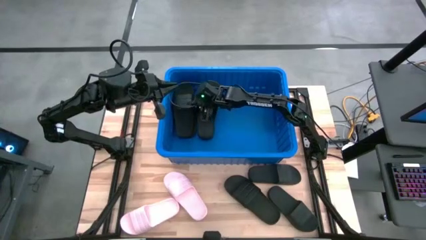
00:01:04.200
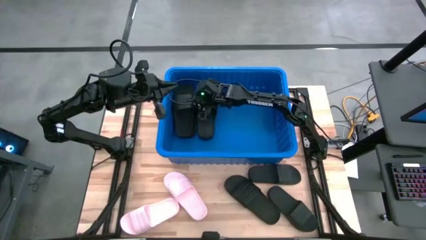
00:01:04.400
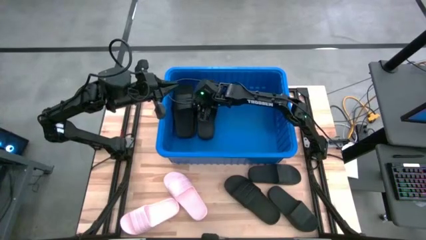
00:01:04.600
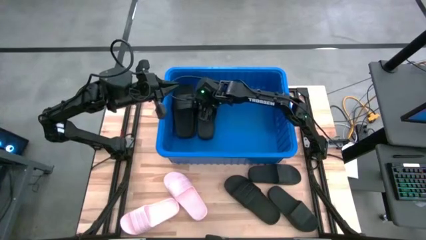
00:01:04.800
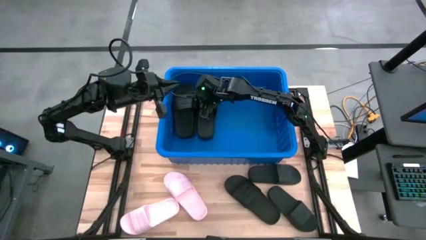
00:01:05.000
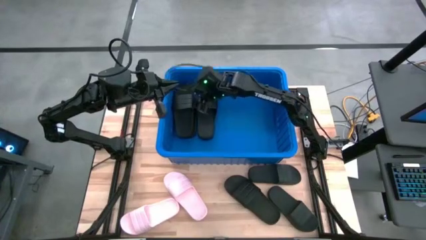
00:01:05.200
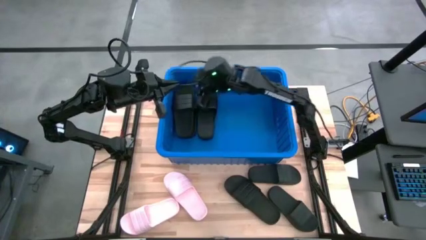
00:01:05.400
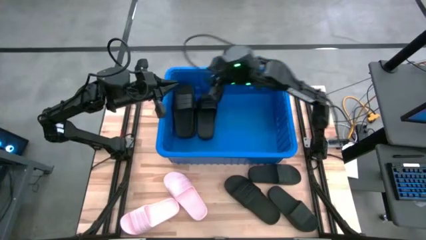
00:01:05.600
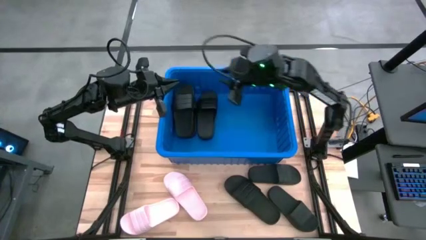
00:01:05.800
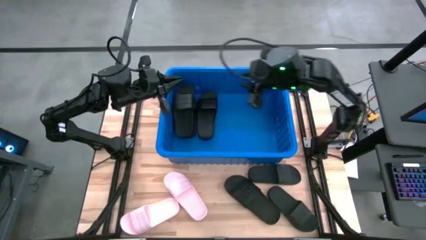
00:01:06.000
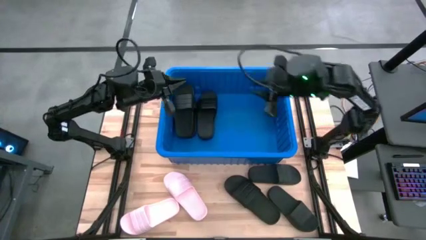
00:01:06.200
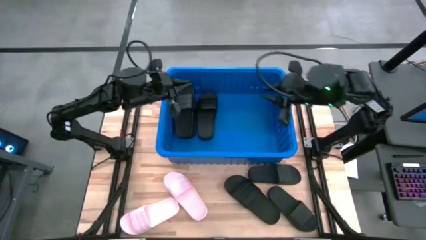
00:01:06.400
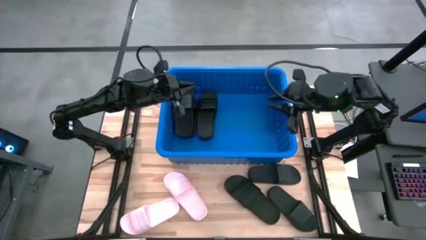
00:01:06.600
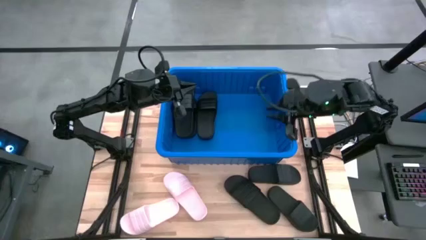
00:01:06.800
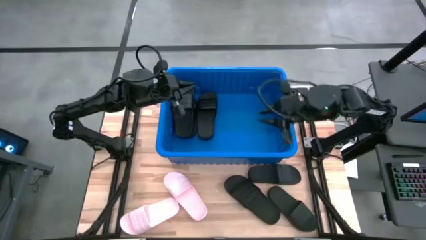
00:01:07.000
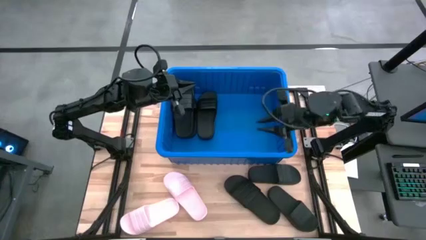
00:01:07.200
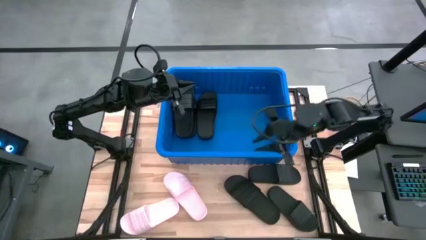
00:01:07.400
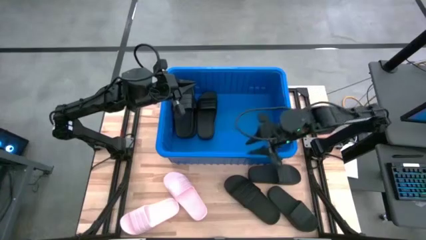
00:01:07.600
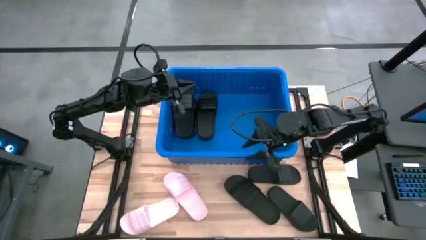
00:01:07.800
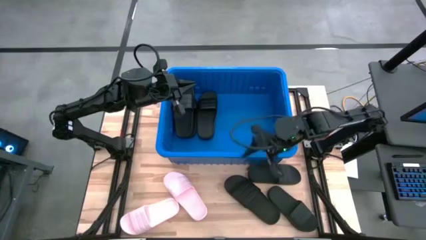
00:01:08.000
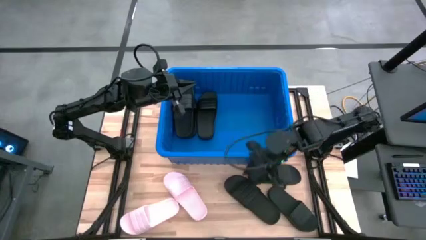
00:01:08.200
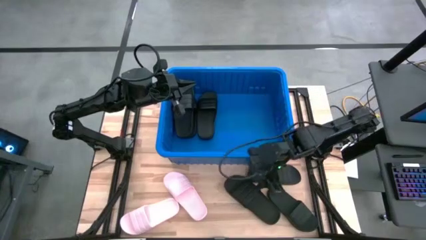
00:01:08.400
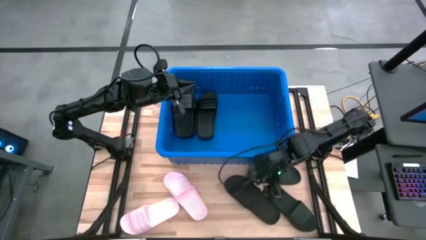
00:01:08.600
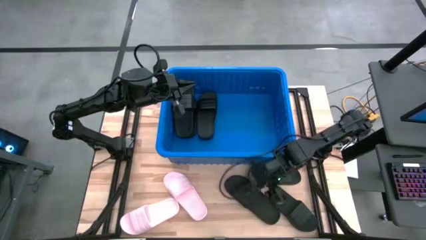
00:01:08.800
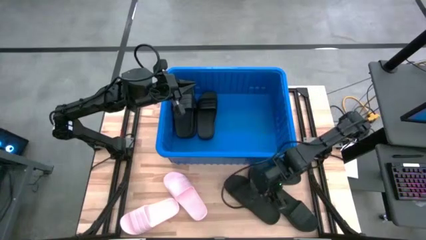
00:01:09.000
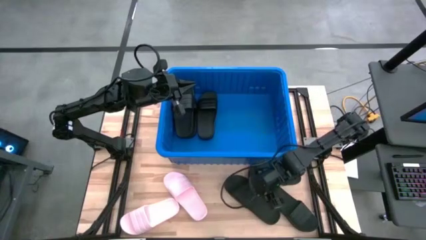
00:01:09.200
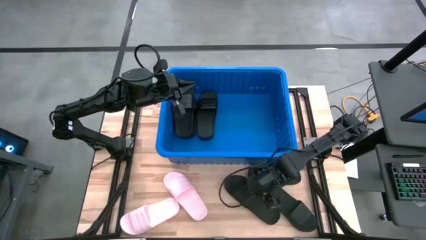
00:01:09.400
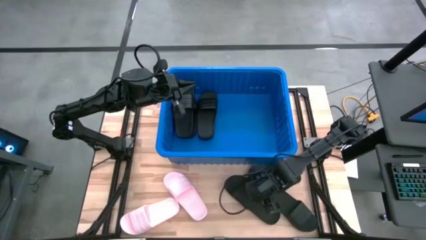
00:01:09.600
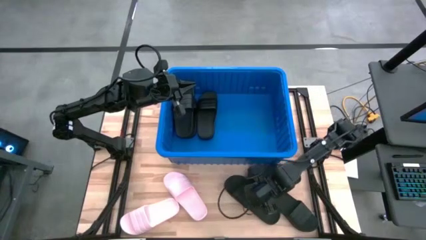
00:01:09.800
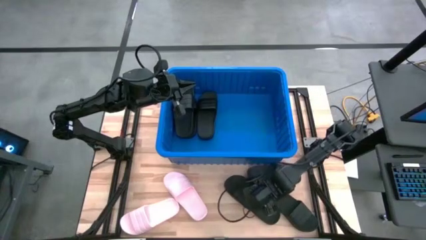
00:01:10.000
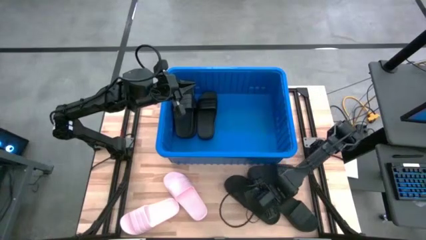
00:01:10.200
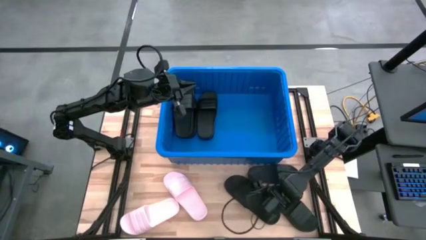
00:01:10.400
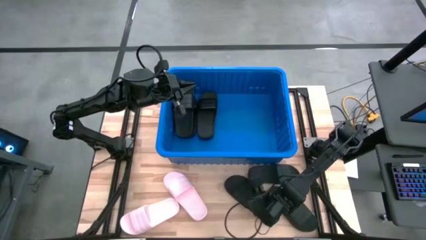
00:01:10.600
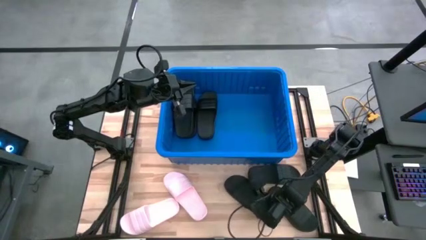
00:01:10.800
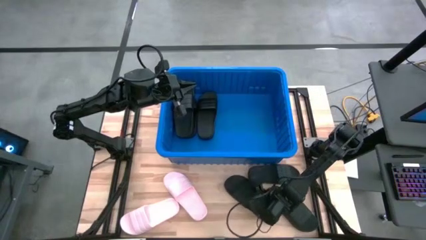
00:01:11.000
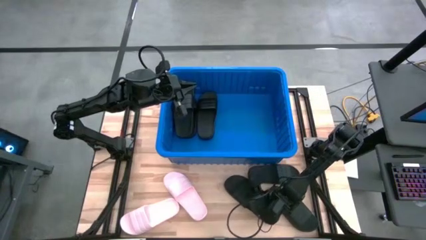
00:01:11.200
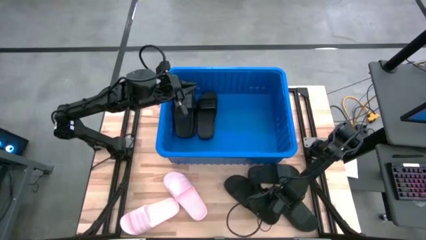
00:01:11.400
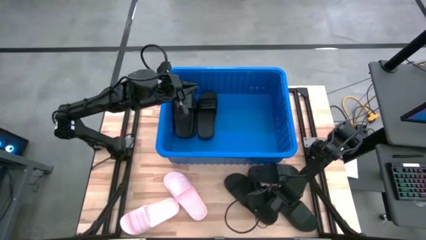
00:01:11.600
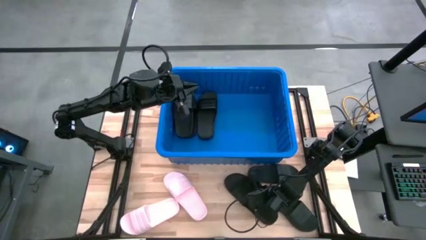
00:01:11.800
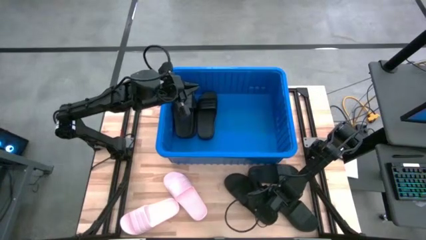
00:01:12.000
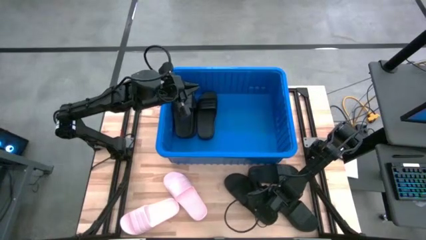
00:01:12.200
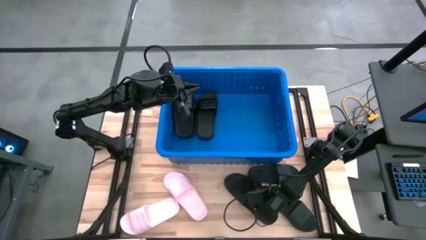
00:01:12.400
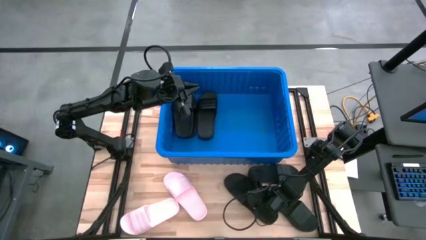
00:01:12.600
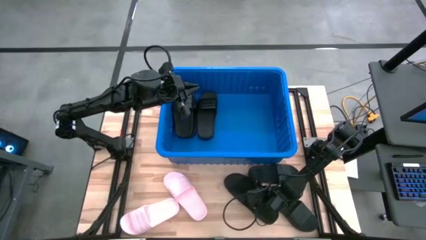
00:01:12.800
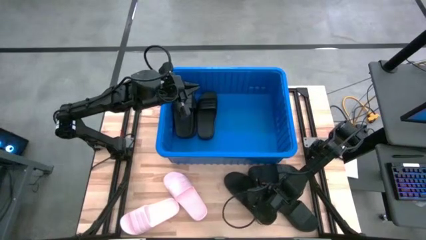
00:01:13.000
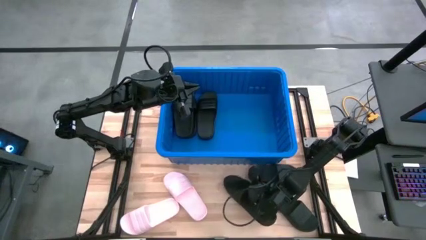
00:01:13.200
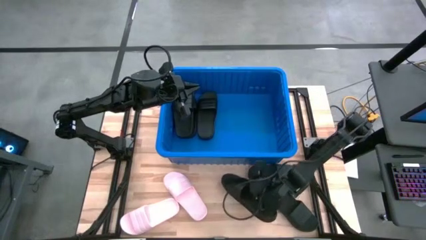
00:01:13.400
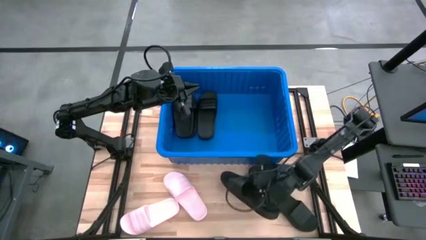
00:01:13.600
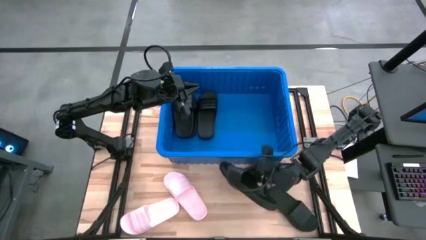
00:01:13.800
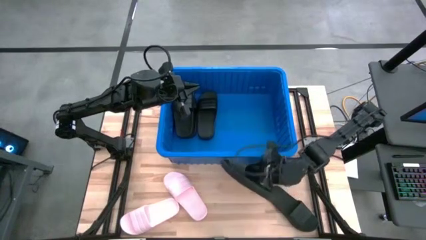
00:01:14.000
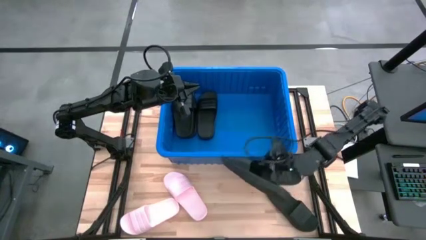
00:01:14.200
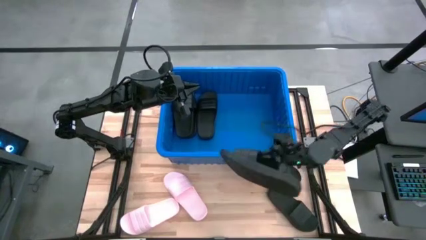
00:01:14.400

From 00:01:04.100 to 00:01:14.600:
Task: Pick and place slides into bin
Put the black slide into the blue bin
